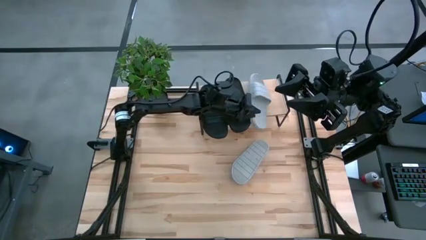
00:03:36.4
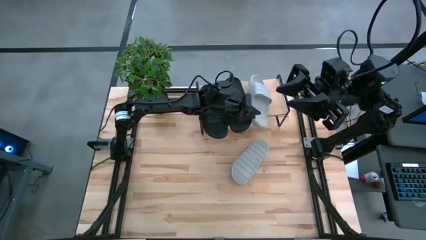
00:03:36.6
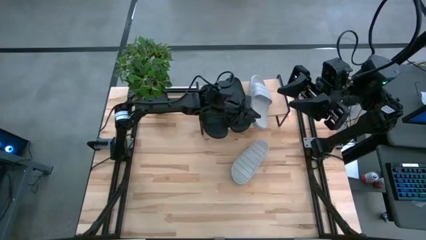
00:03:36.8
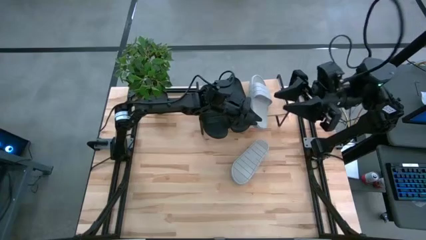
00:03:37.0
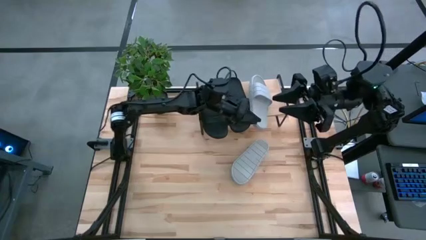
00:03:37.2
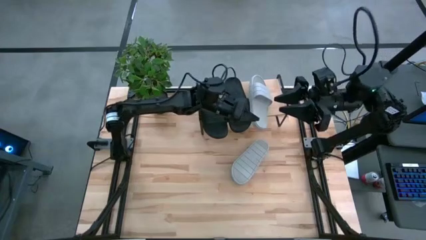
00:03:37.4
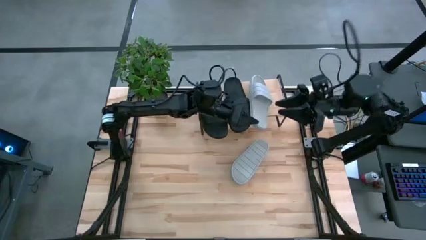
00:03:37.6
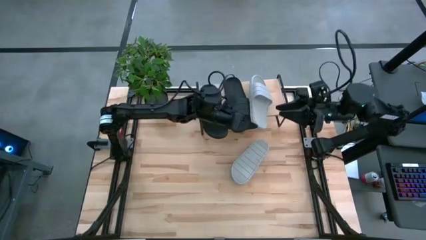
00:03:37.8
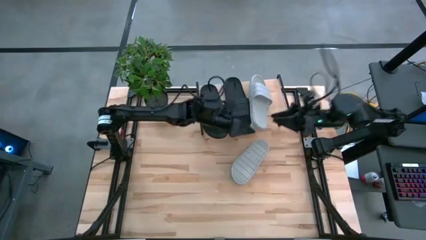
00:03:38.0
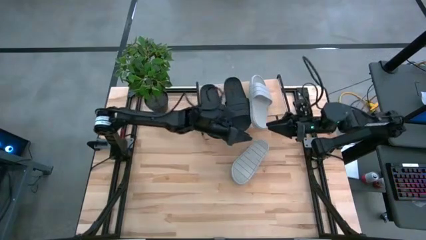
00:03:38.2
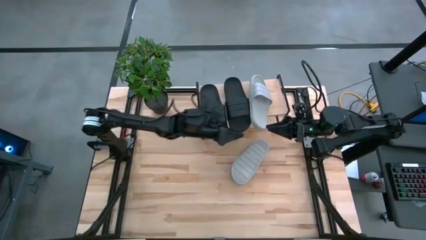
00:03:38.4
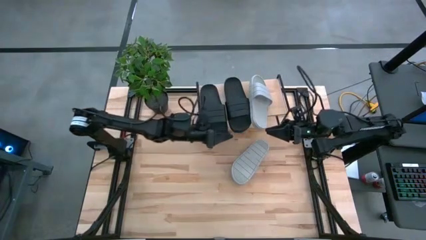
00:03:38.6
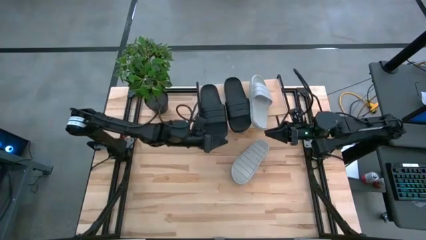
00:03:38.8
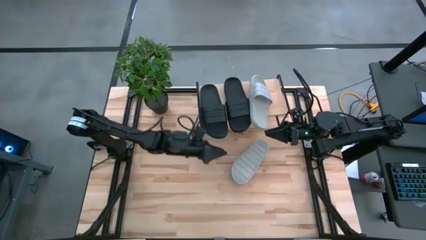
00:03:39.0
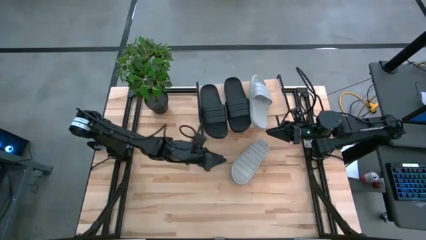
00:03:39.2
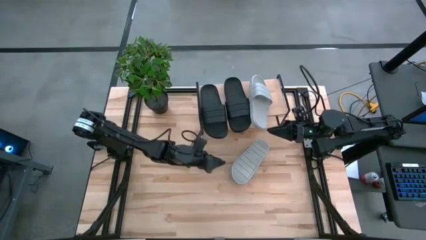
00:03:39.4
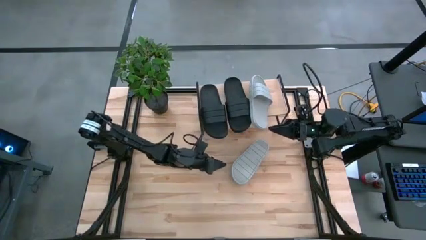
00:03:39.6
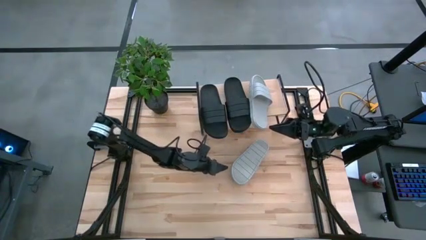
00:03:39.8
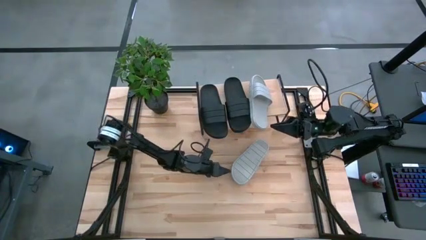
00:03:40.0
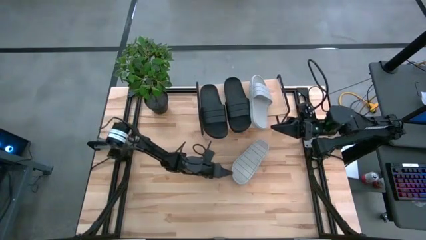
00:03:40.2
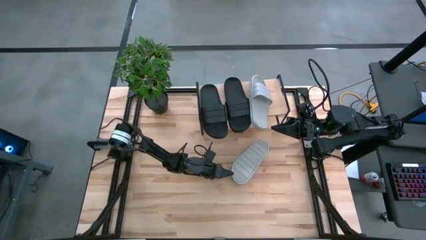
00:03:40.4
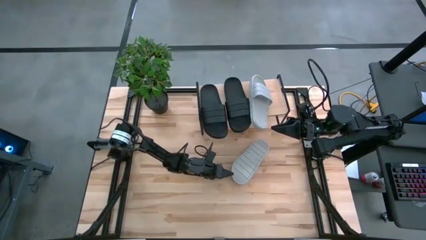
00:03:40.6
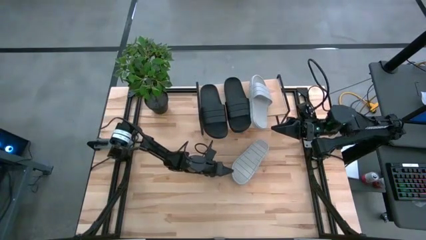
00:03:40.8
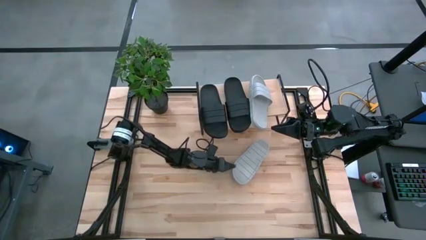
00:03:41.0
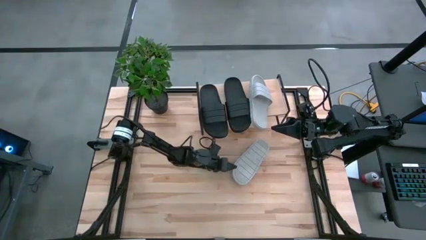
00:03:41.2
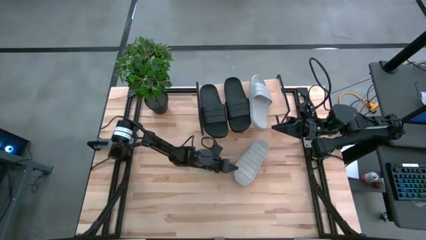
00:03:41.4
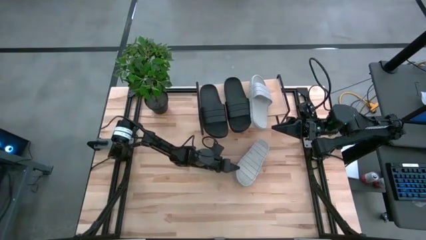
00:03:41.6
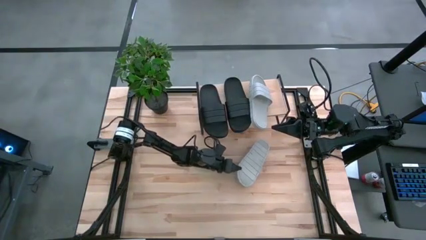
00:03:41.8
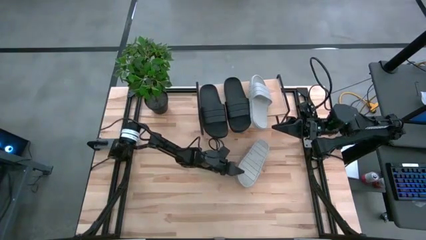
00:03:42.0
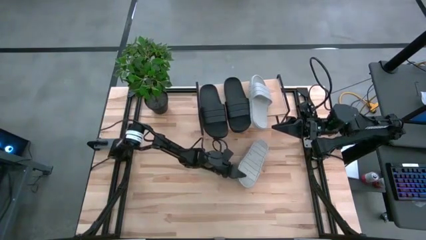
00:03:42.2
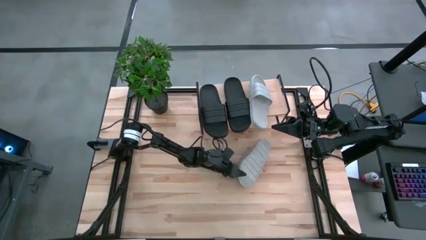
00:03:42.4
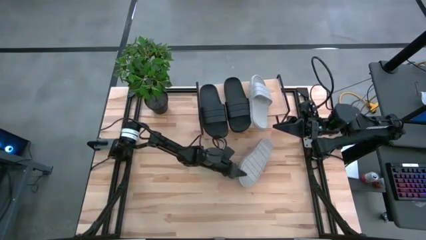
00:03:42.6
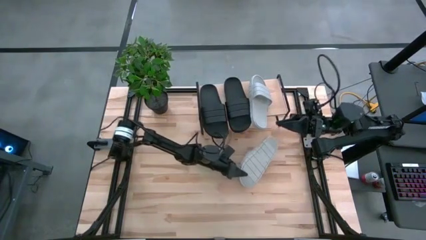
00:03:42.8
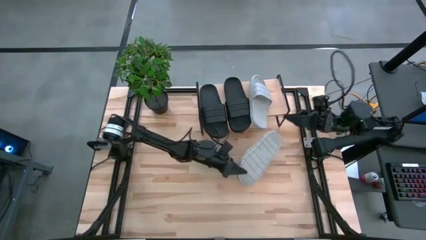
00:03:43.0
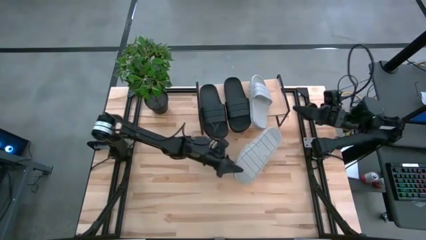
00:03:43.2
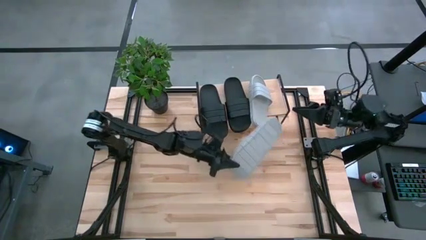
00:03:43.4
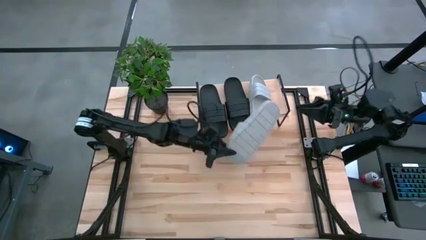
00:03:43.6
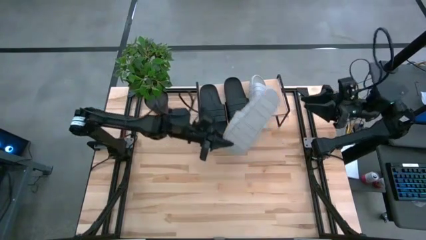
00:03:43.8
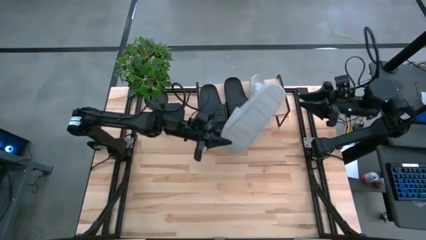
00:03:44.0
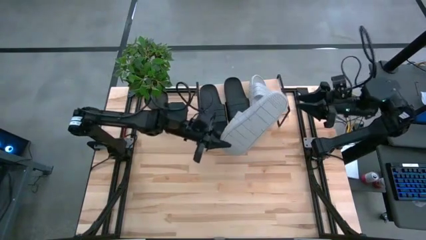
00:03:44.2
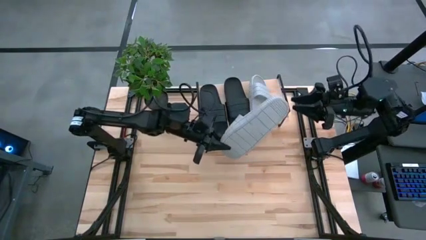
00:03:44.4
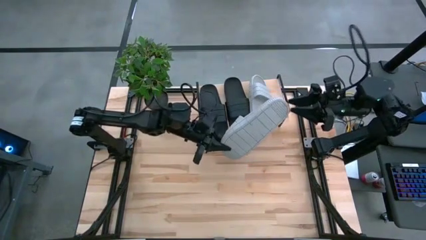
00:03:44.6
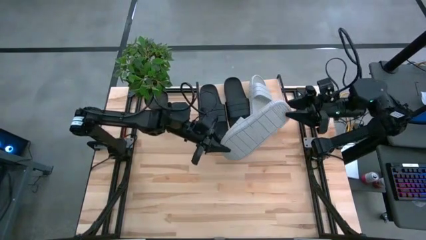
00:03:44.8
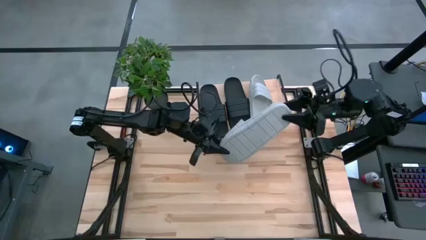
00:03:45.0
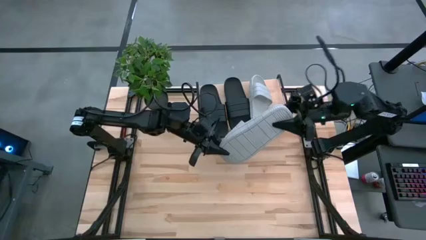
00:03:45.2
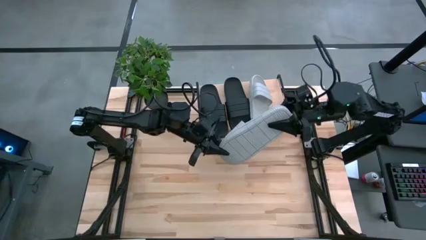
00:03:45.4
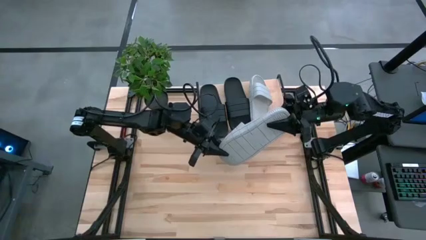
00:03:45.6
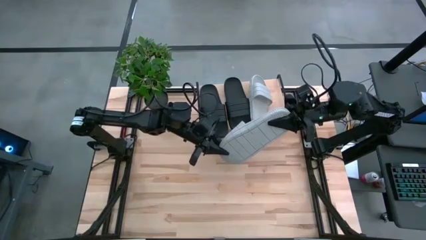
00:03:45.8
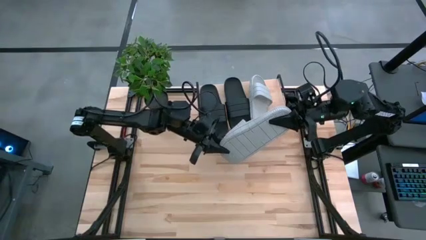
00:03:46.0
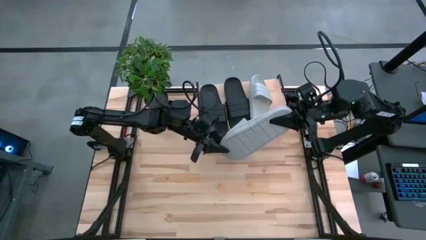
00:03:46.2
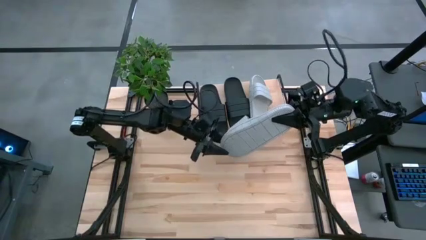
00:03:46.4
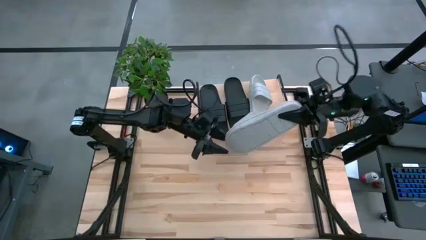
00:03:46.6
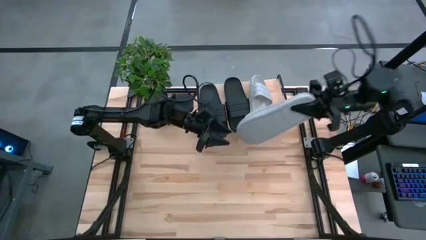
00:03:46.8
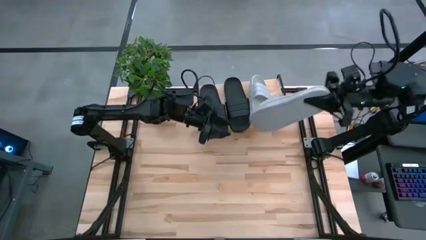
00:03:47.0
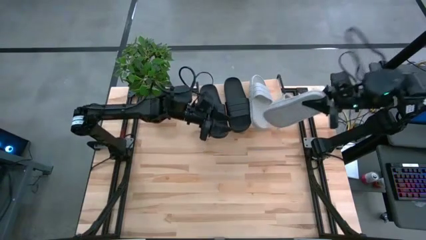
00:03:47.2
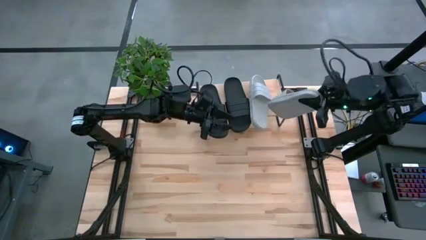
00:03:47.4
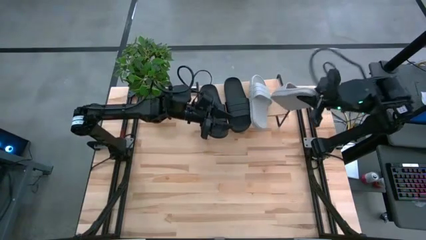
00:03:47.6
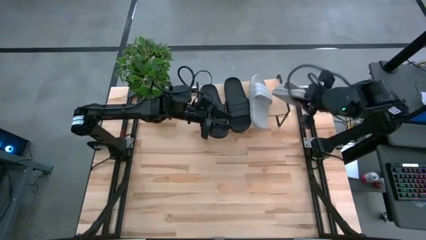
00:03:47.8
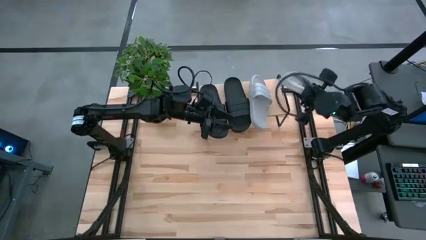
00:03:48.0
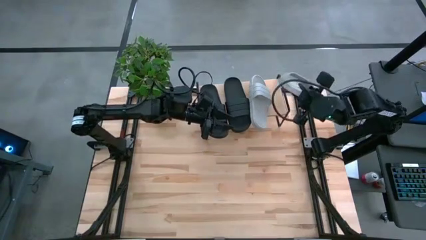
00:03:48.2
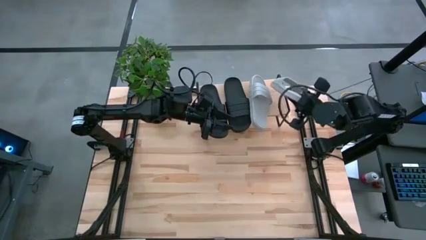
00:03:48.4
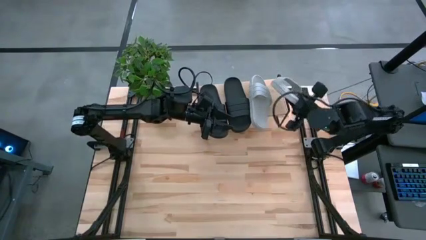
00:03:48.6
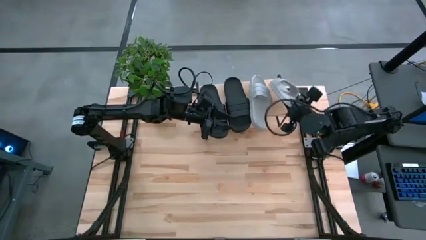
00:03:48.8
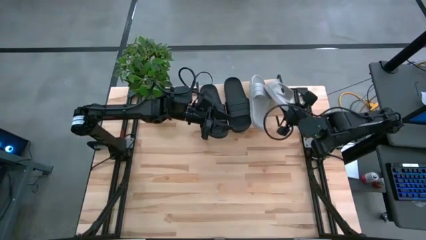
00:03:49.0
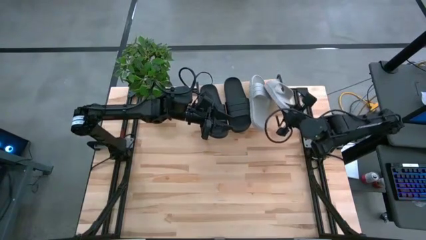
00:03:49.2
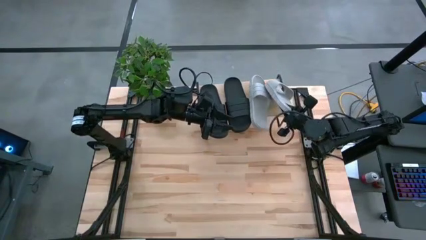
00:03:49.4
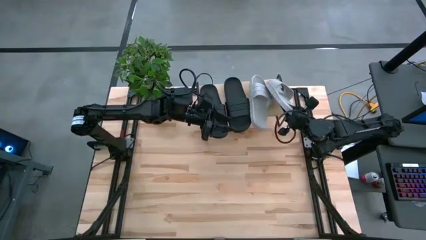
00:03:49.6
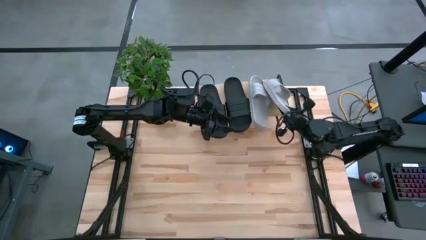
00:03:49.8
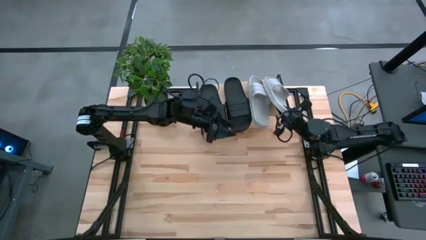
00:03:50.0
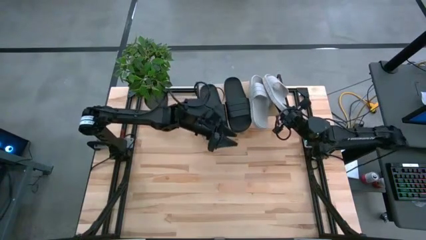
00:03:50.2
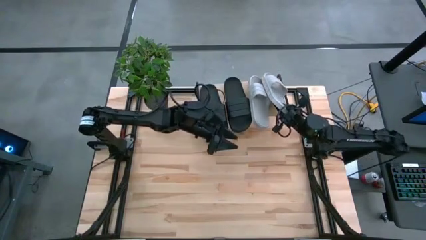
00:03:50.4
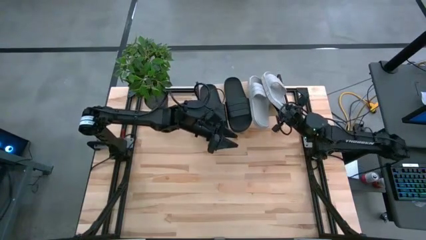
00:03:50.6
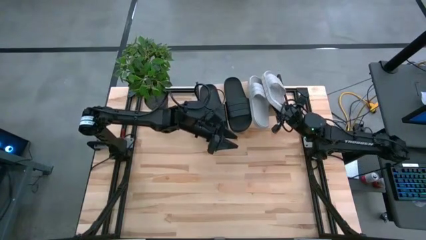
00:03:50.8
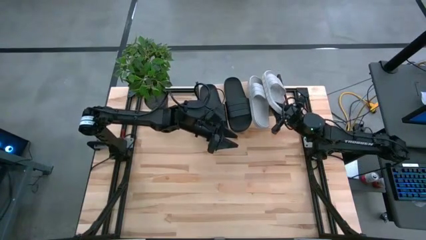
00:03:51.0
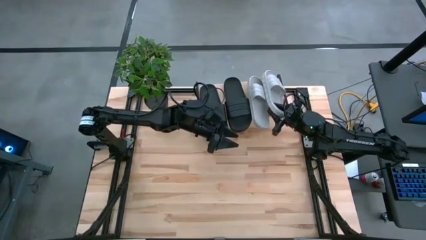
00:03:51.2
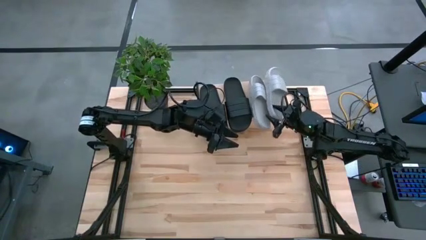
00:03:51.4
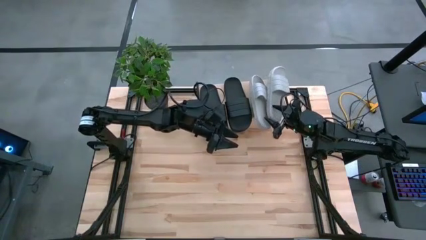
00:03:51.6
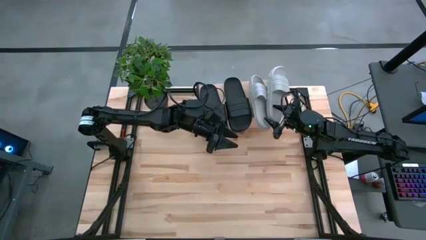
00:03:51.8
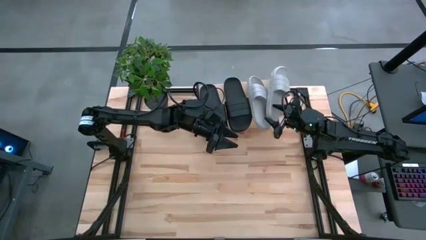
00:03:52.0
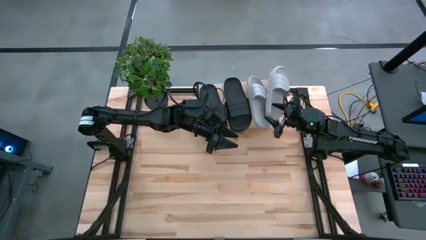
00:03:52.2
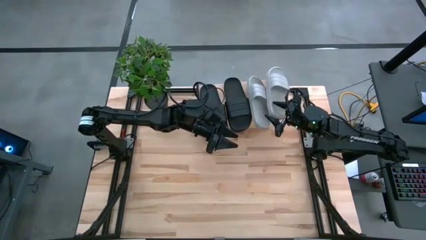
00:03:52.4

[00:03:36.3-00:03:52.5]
Task: Pick and place slides into the shelf
Put the gray slide on the shelf
